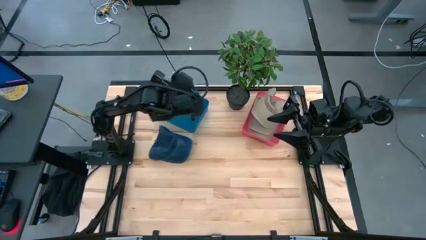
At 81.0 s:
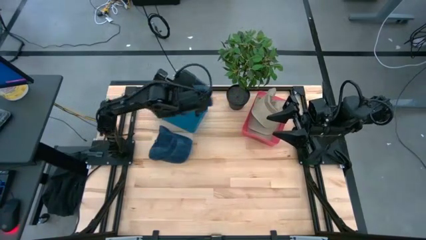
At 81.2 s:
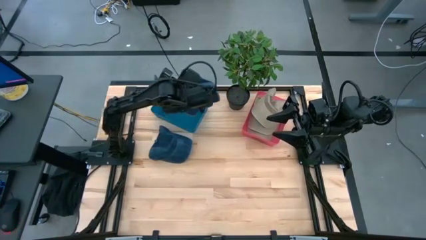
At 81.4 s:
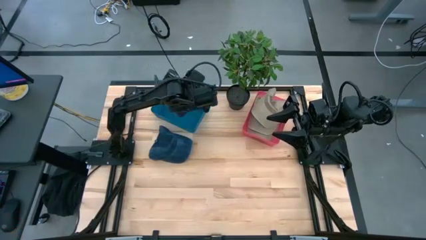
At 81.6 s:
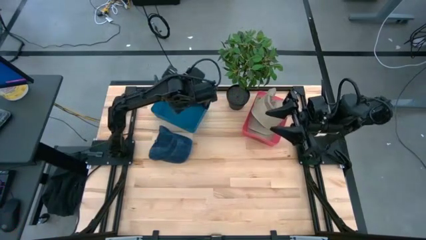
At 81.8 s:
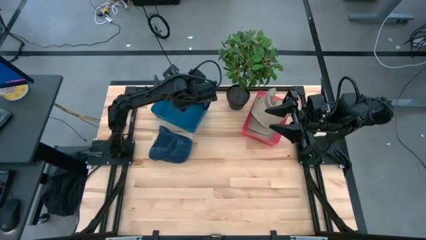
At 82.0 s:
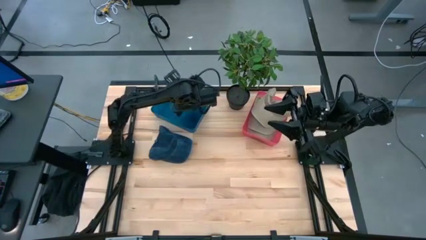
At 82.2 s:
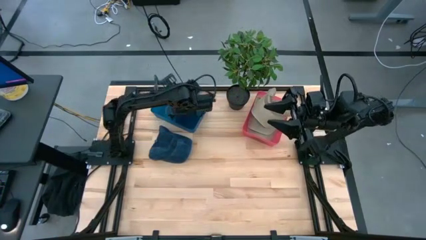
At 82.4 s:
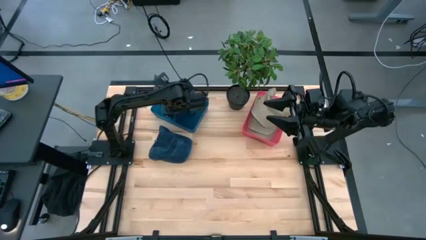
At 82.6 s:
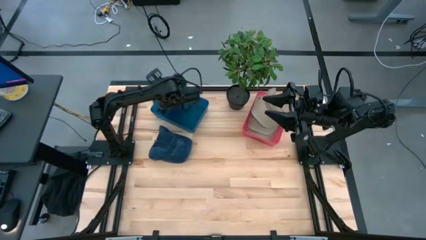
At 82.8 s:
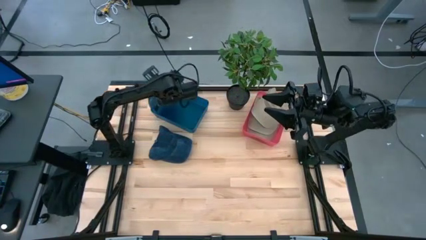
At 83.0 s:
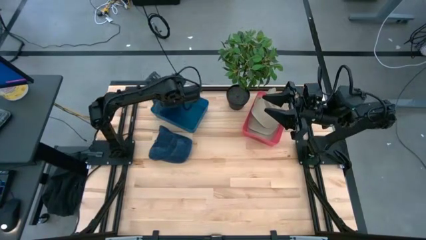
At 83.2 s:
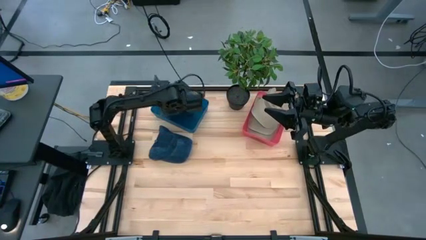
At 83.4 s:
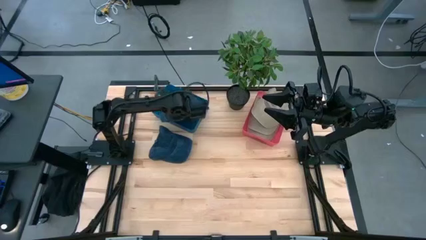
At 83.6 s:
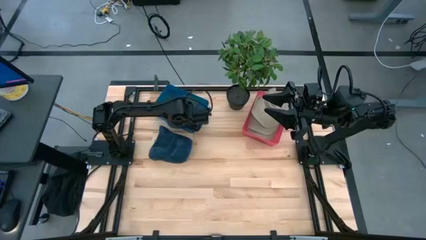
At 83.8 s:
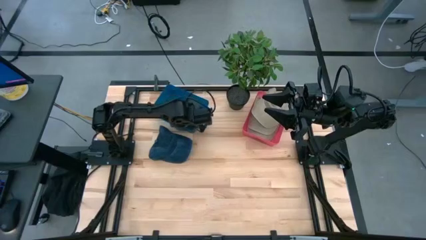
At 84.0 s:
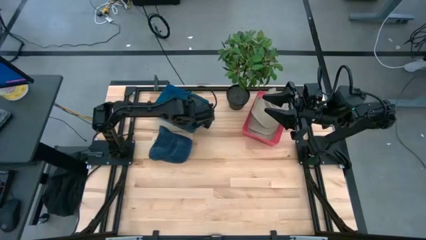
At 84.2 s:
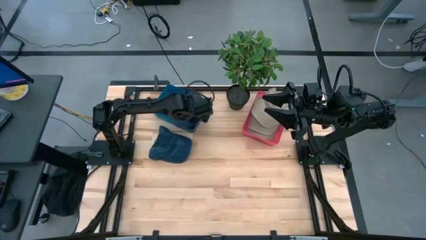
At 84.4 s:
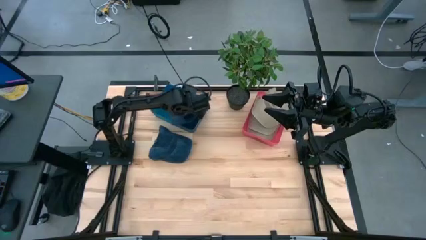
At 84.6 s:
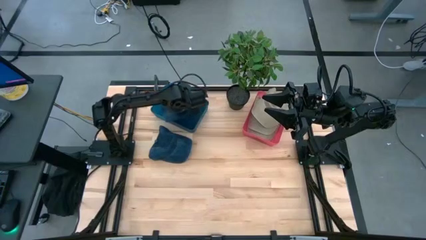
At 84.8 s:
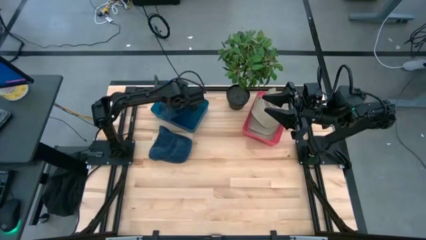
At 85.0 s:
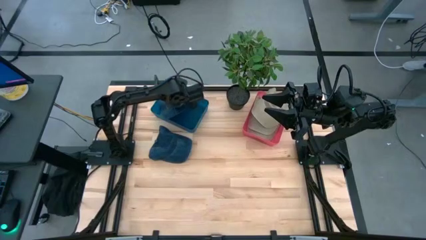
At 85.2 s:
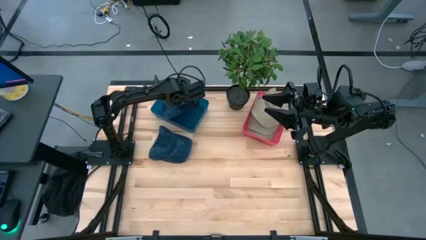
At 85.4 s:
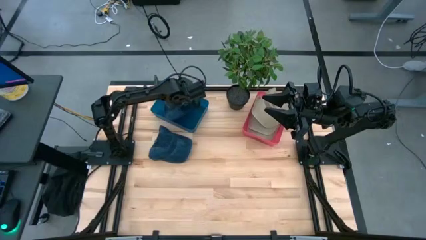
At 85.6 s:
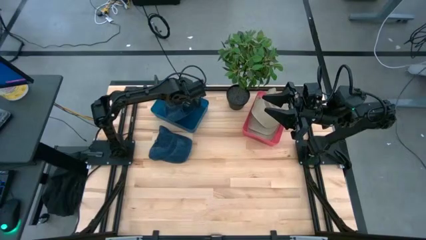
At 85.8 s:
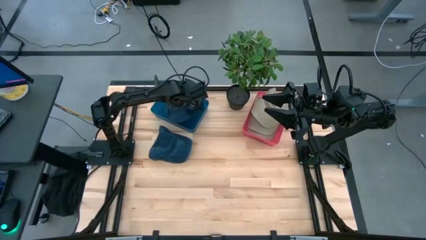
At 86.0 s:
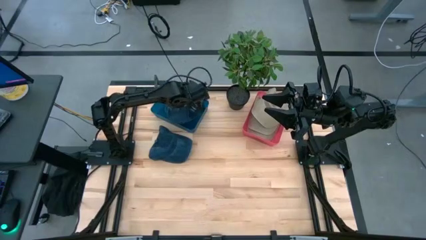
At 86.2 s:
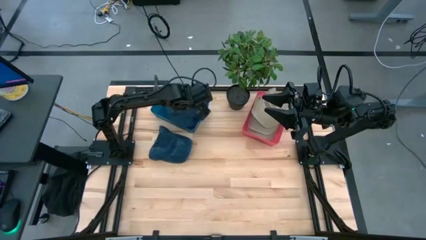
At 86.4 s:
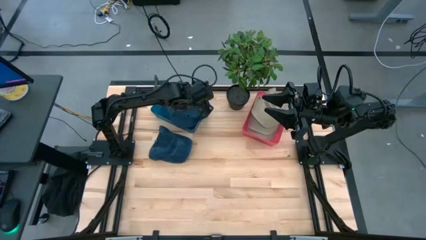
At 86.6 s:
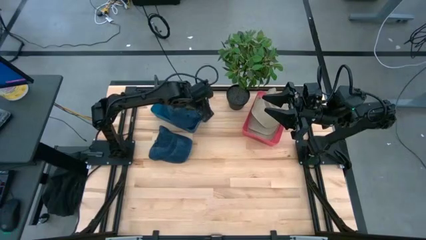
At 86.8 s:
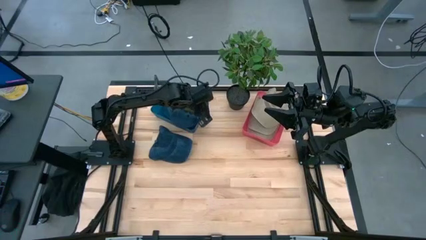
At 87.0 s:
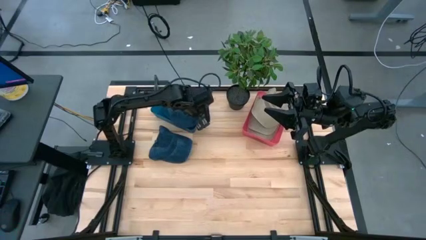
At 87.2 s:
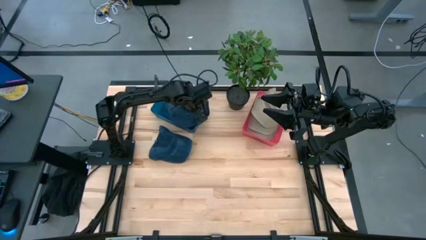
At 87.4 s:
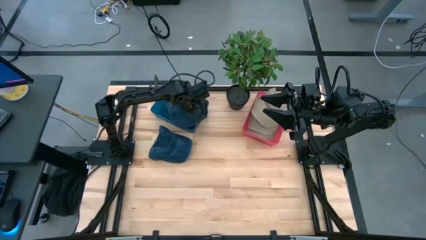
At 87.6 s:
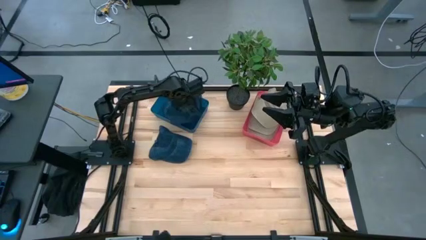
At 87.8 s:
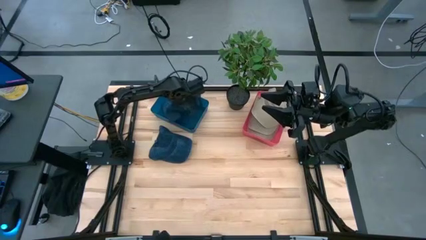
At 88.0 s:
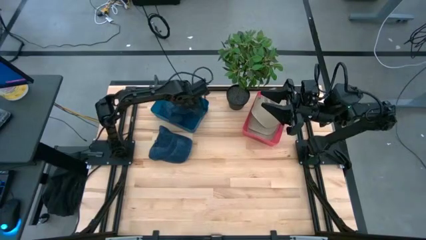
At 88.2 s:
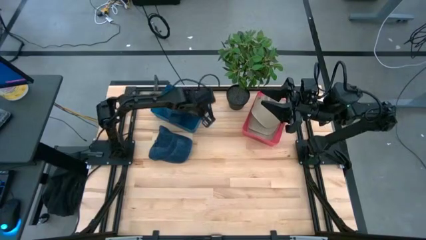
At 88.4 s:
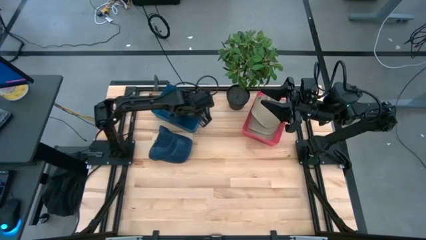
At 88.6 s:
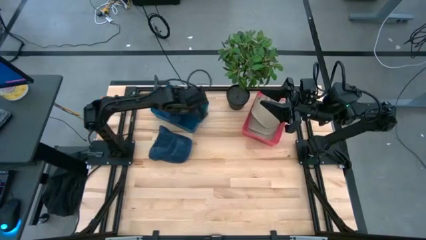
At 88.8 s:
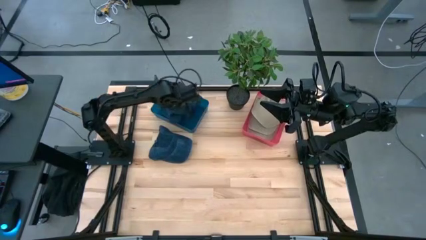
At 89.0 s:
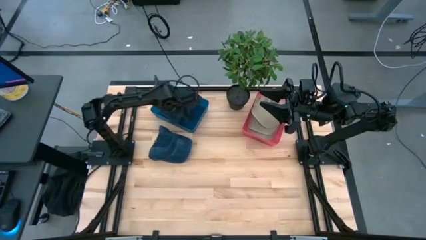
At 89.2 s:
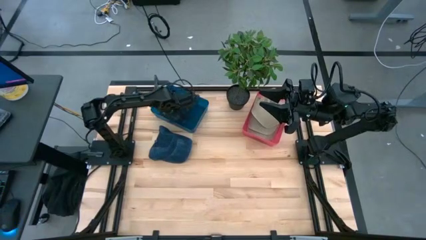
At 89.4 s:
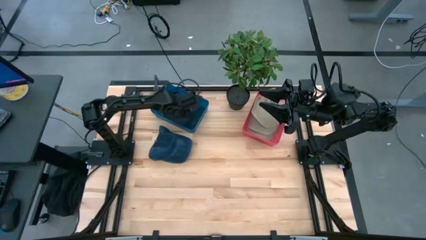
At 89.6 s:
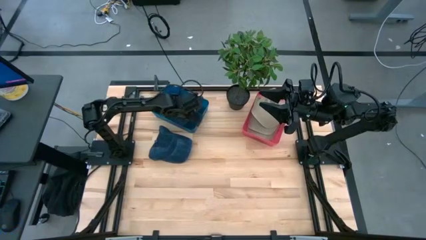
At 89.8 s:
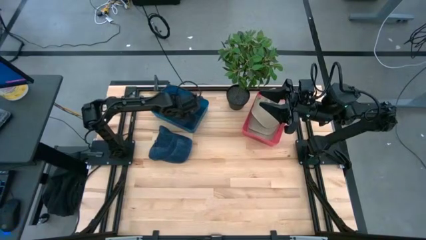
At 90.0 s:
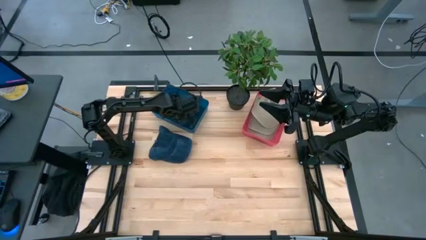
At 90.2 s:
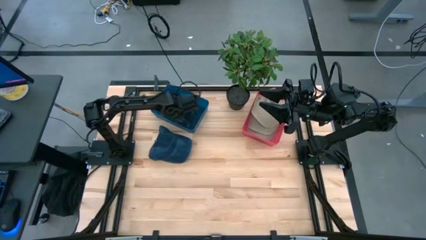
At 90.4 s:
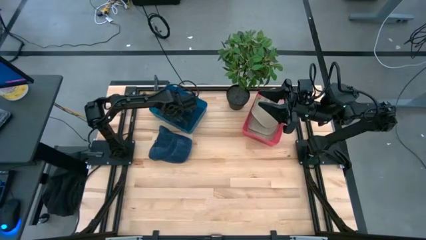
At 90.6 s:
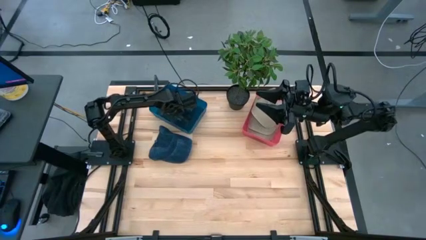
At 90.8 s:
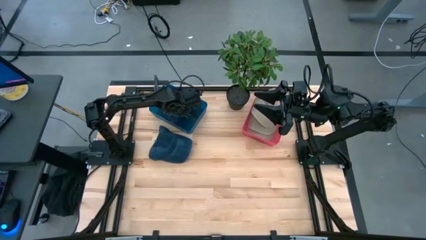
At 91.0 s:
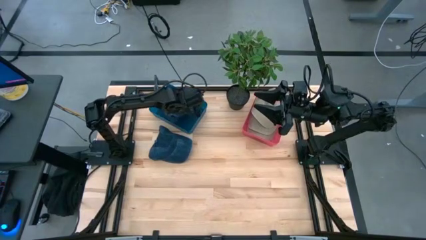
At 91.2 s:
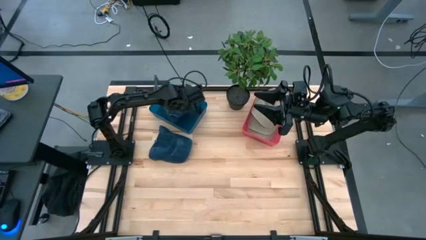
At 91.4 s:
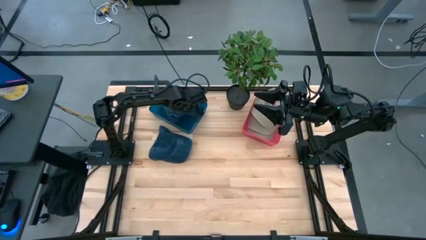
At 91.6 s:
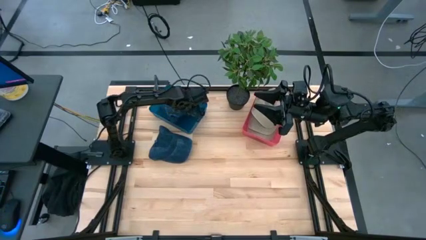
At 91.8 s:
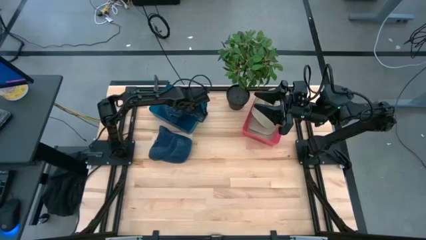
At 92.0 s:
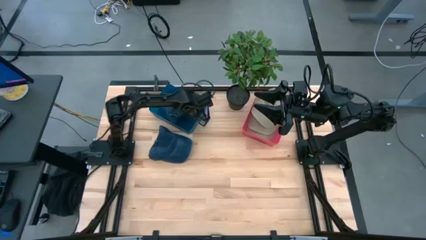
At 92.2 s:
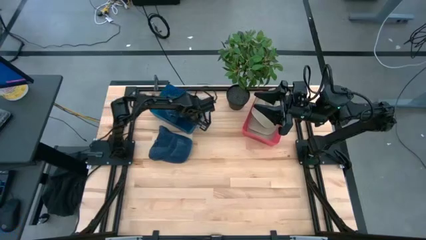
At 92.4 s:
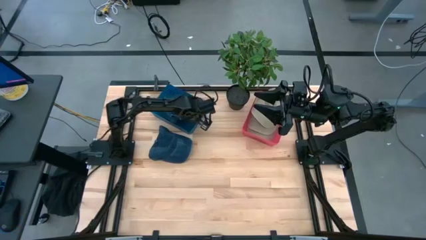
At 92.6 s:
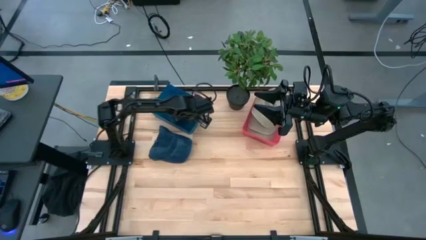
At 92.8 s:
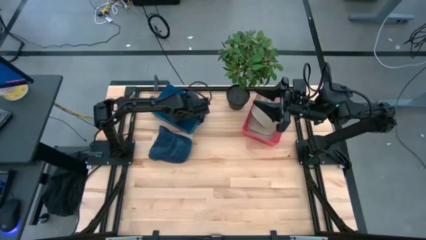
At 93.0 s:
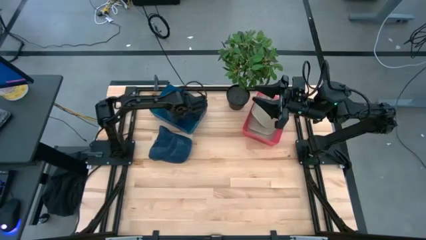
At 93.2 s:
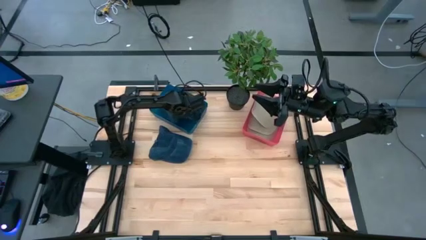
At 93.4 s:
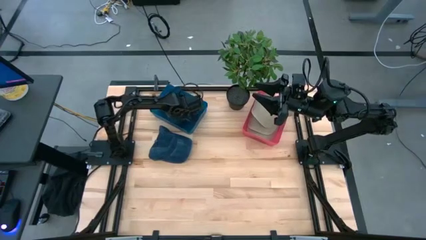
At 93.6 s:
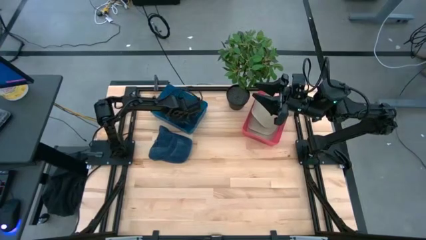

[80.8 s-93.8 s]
Task: Pick & Place hat
Put the right blue cap into the blue bin
